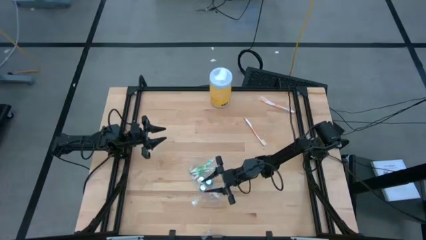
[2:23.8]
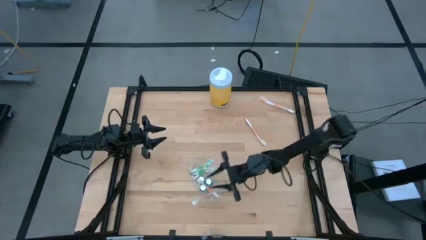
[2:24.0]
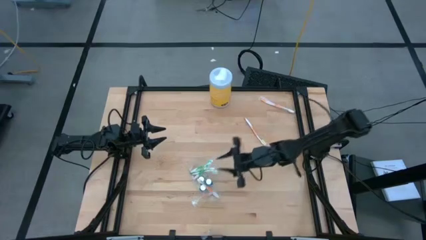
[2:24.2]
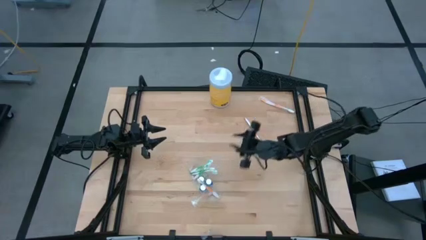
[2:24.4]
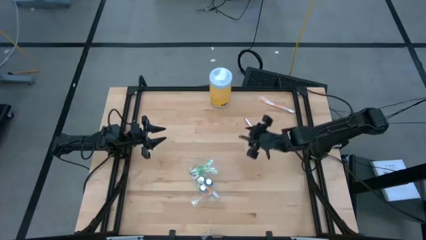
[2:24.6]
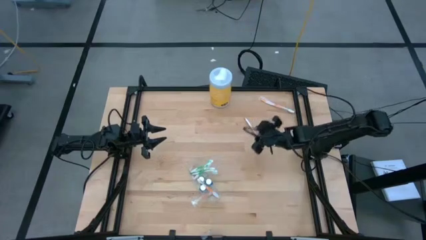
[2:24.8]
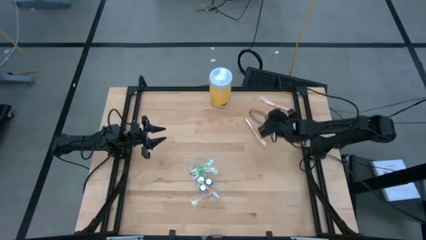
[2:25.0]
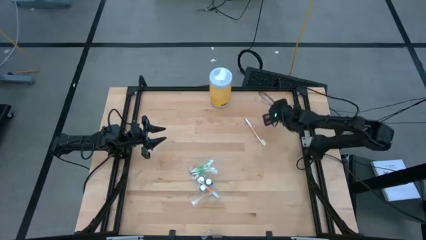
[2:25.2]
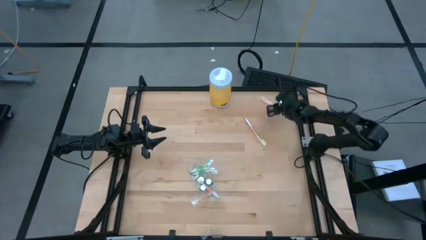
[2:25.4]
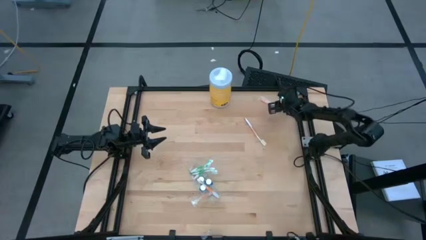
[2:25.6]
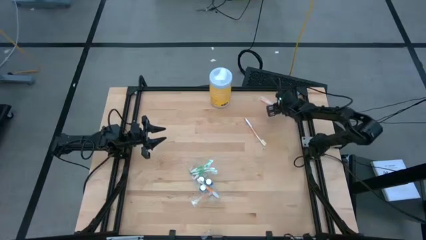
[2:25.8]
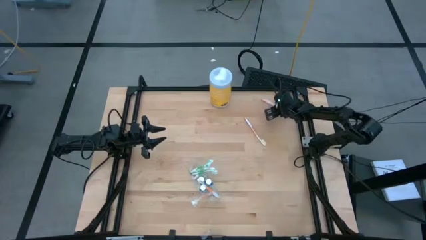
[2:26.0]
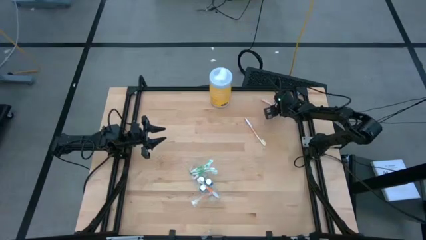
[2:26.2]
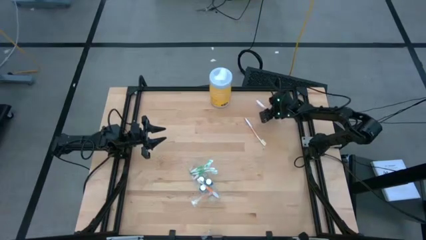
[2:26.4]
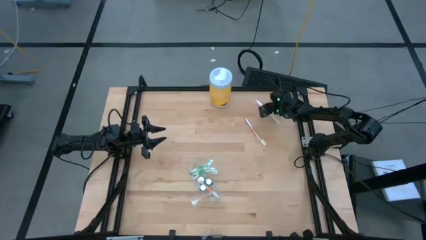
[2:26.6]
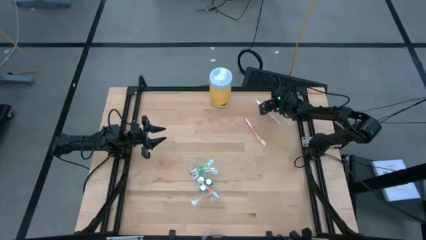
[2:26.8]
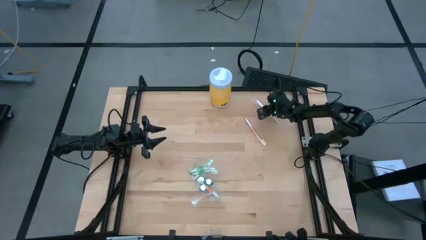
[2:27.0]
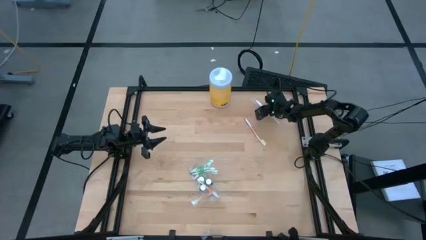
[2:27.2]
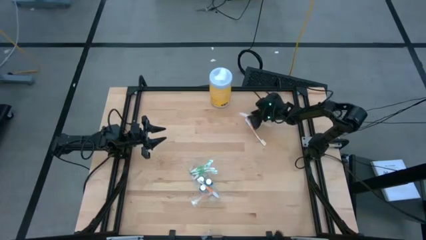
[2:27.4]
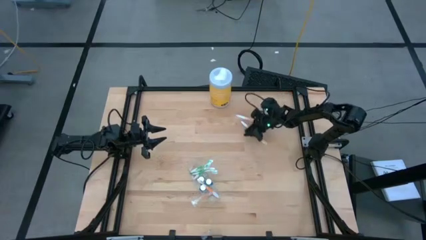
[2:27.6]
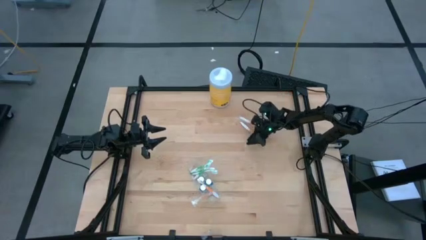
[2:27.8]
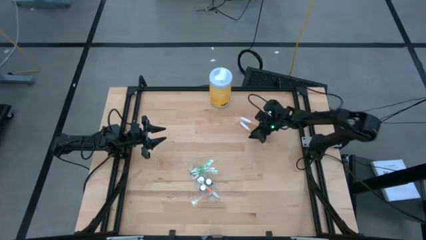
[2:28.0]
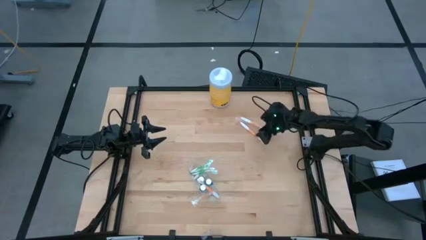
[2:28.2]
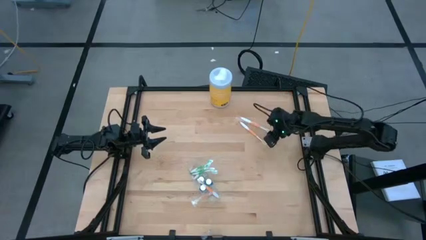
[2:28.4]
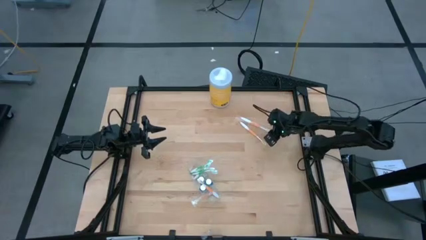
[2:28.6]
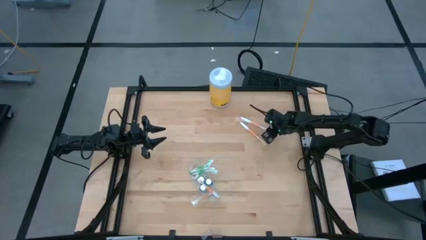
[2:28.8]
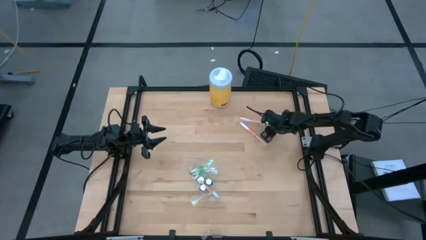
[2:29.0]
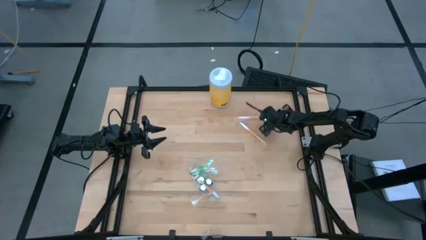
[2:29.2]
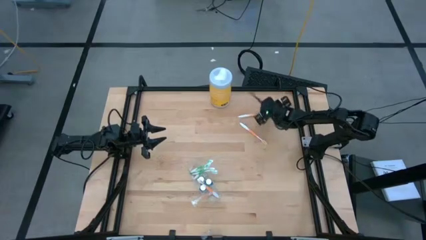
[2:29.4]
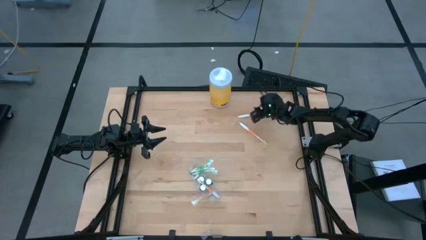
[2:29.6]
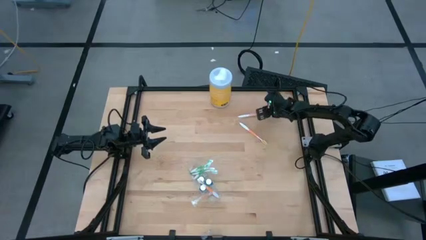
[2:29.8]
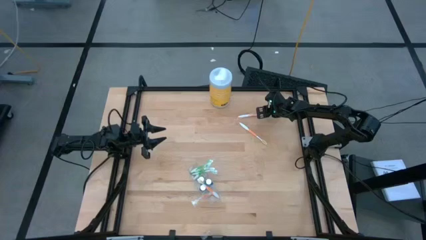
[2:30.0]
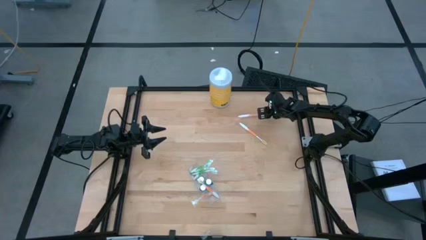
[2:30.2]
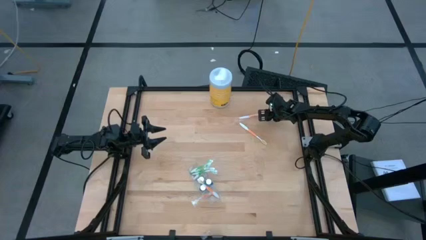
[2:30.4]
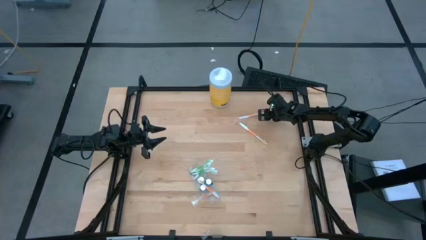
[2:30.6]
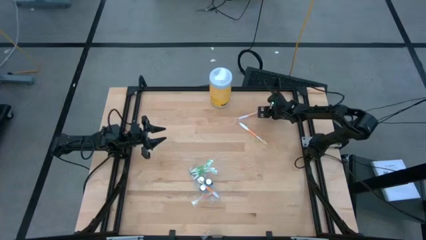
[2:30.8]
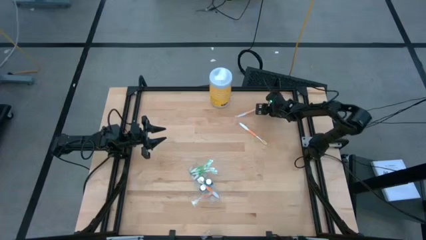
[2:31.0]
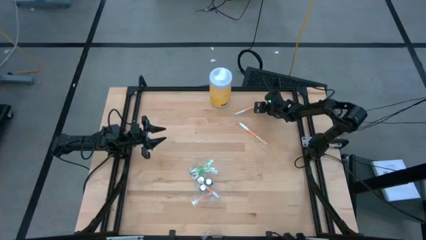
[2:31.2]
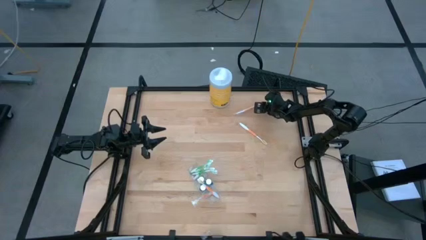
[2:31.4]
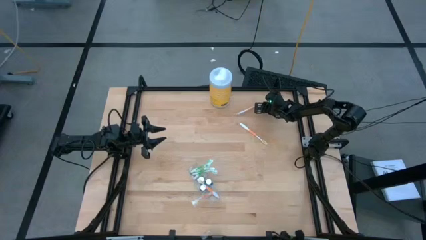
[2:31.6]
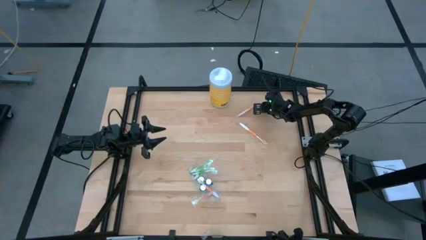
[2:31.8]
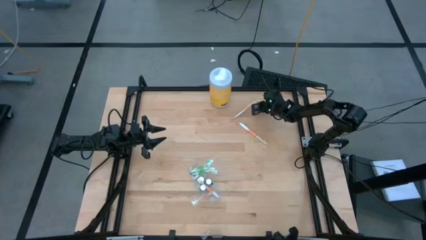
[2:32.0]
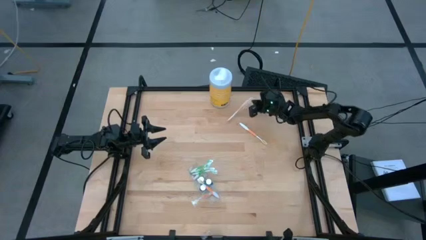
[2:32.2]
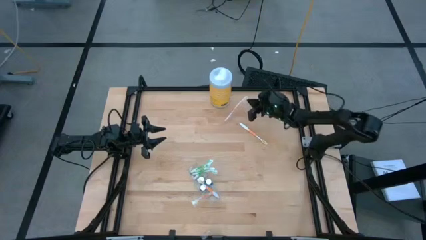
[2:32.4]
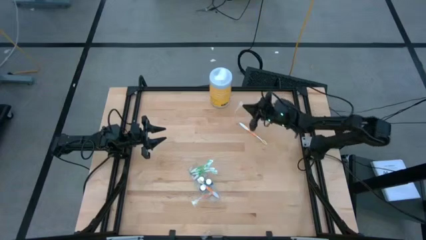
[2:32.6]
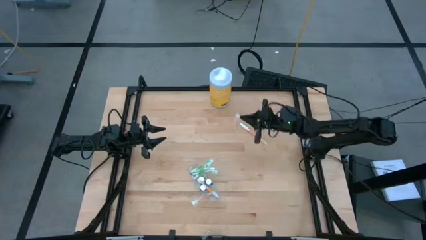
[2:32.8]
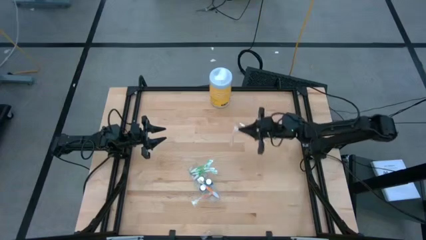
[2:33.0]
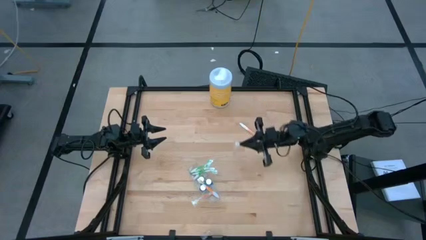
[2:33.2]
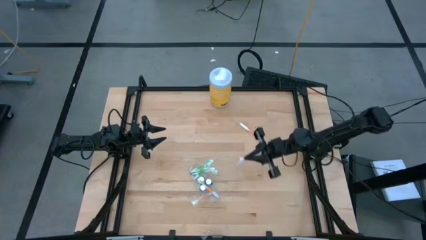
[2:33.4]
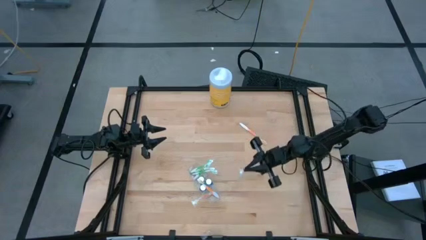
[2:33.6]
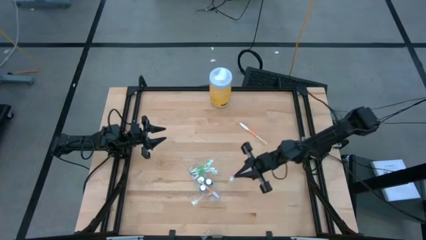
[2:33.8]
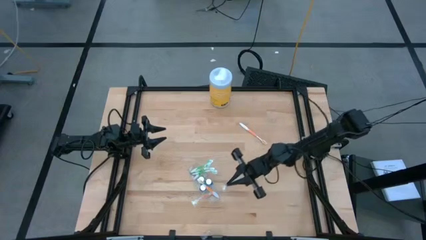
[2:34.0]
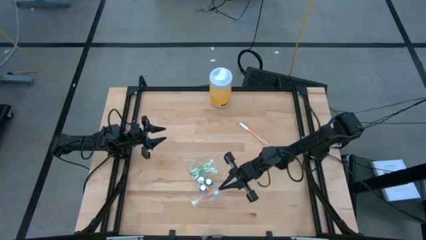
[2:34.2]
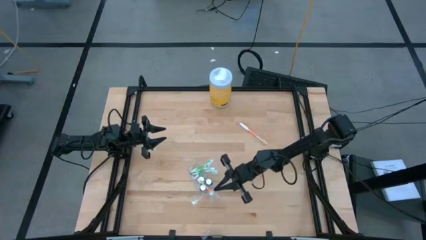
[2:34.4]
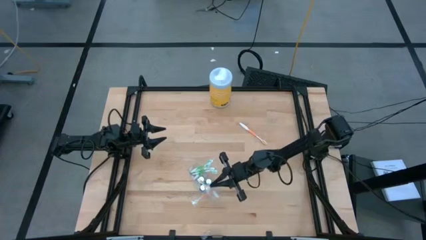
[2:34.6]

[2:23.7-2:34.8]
Task: Pick & Place toothbrushing station
Put the orange toothbrush into the transparent organizer

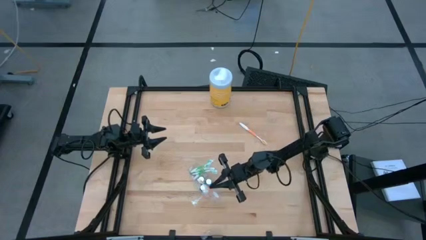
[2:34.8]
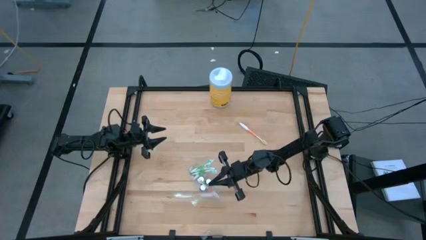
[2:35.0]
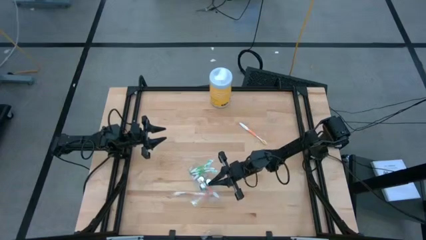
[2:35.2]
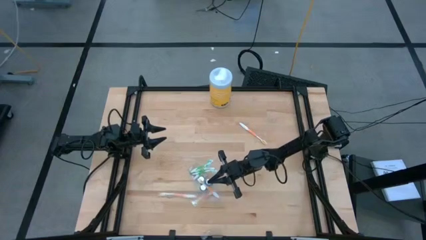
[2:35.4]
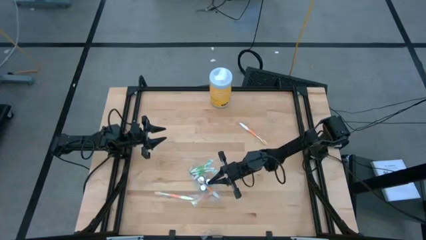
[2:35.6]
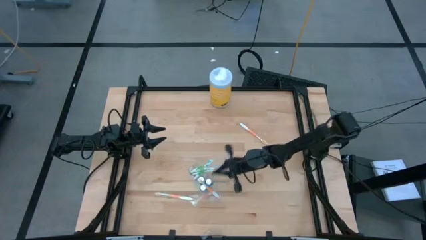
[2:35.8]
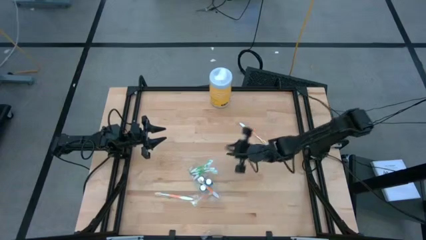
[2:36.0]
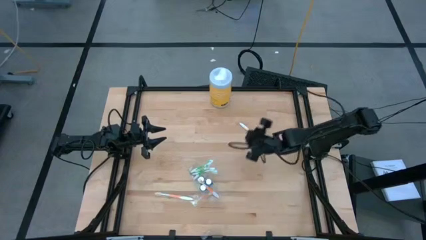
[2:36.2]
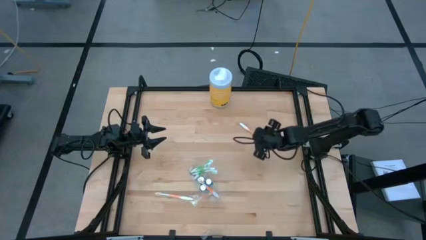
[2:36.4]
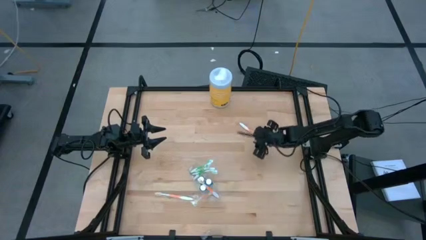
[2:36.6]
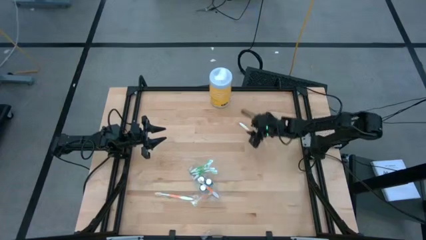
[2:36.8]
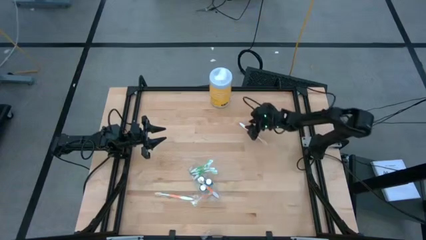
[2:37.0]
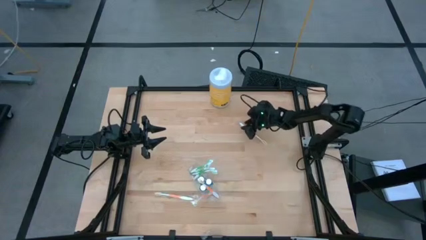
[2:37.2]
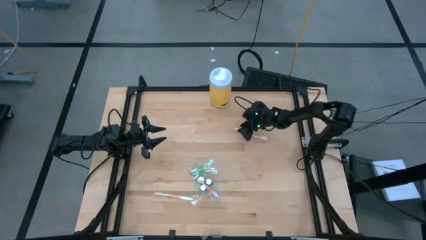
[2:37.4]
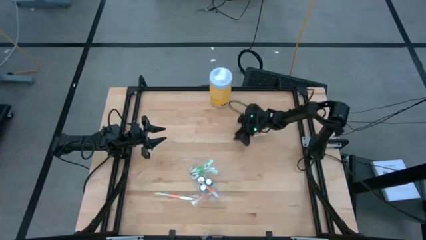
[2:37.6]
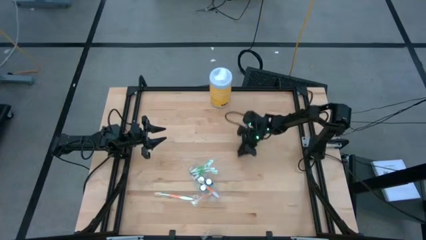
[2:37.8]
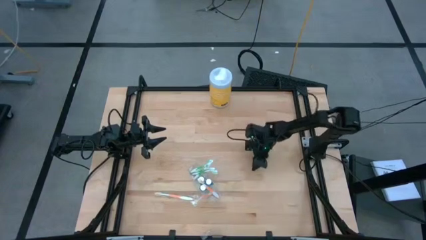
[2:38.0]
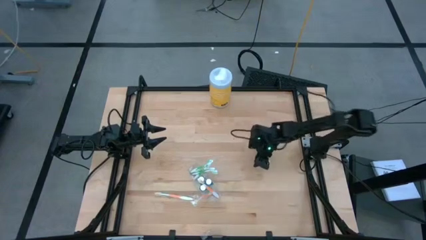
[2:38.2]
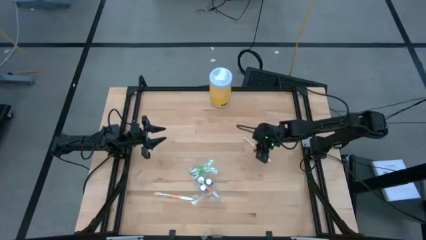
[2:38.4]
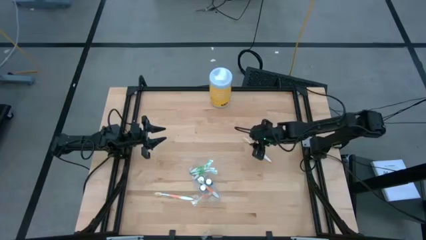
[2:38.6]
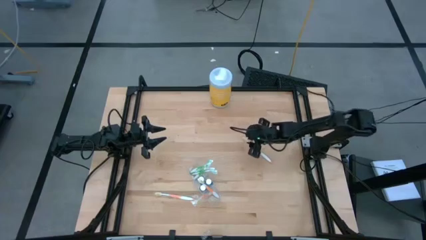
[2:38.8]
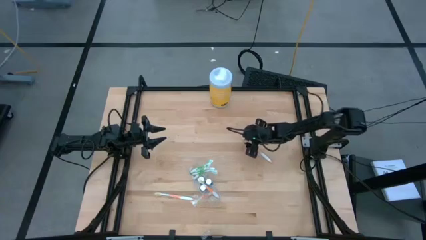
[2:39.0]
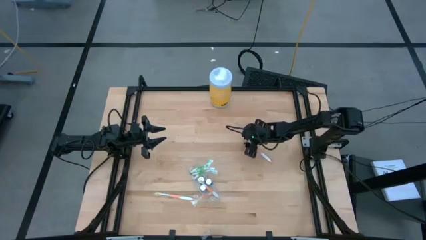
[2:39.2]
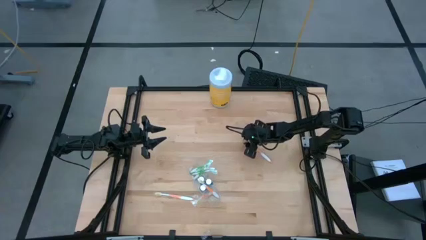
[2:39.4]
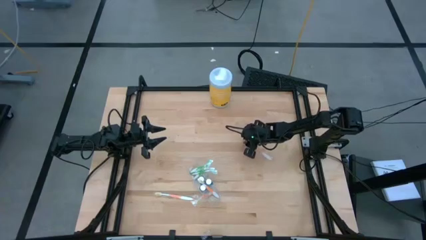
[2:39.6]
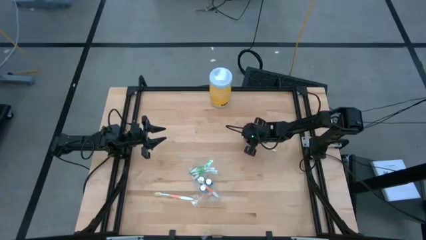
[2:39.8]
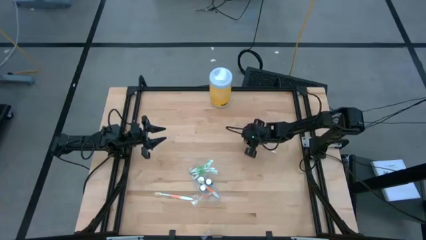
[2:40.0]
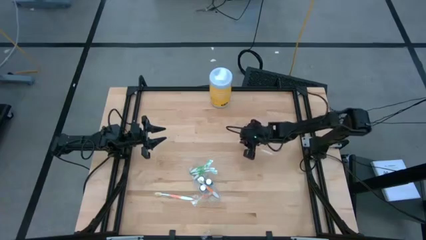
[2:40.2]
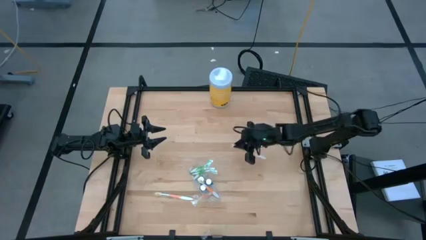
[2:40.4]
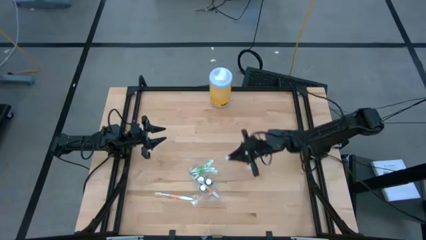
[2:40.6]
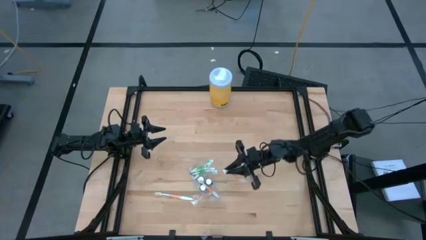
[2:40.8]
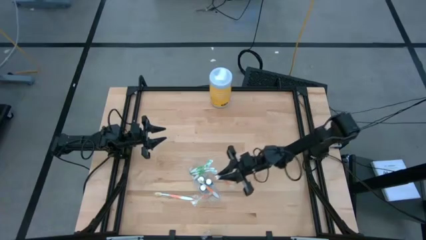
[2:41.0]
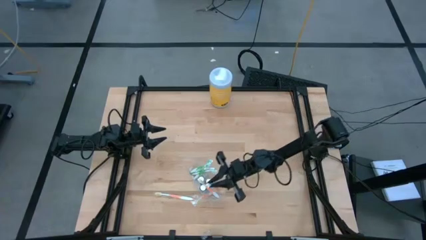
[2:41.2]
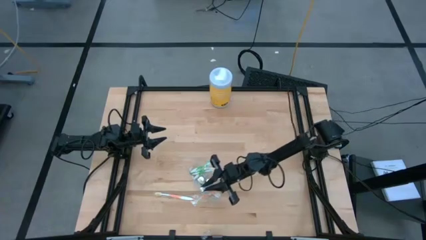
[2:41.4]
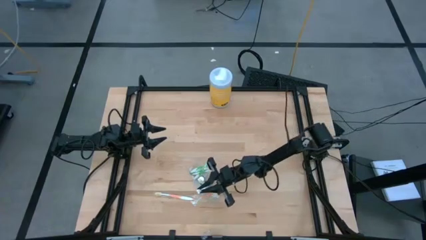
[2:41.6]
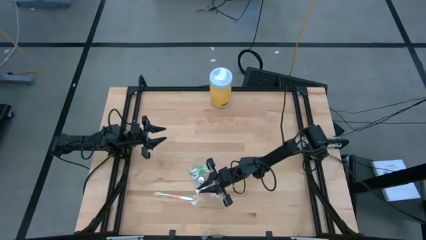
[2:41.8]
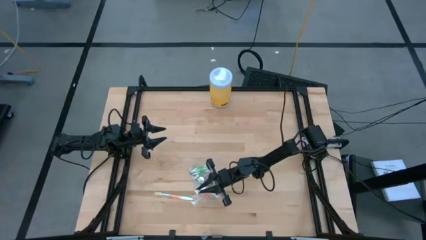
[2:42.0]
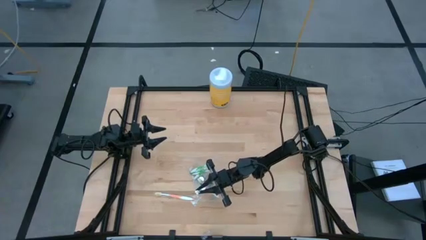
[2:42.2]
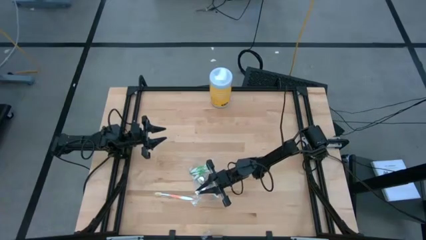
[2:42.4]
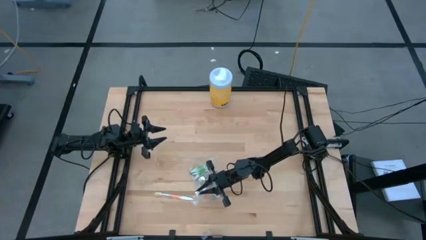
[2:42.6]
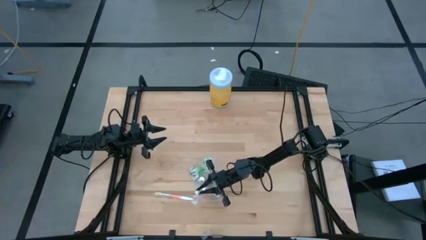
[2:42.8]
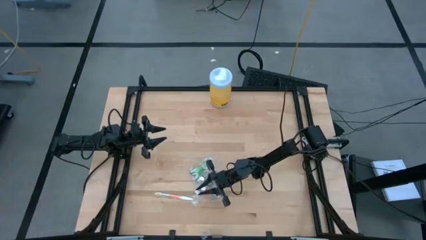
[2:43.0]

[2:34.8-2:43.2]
Put the orange toothbrush into the transparent organizer
